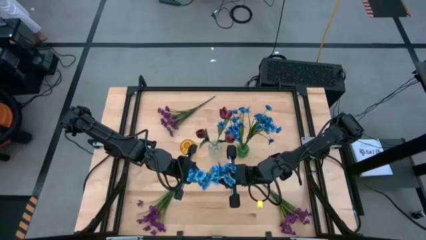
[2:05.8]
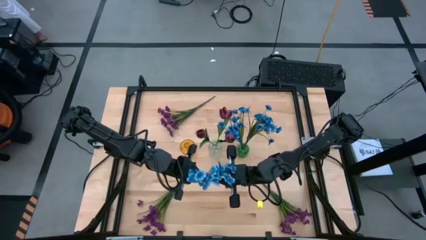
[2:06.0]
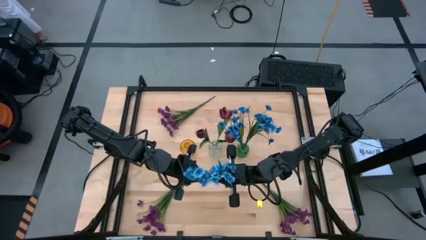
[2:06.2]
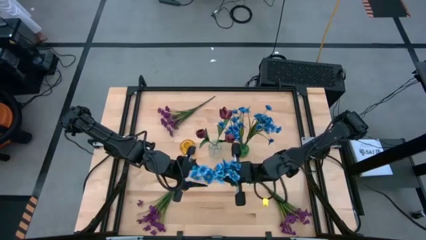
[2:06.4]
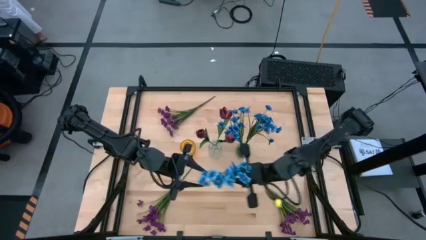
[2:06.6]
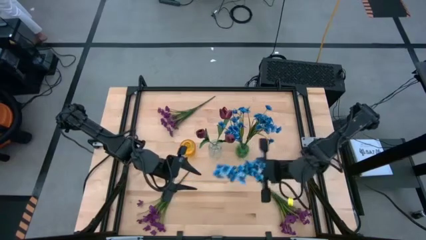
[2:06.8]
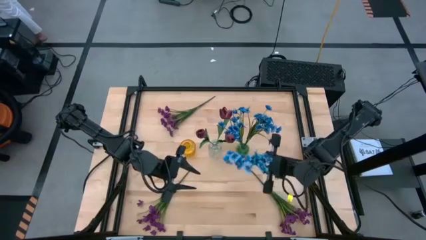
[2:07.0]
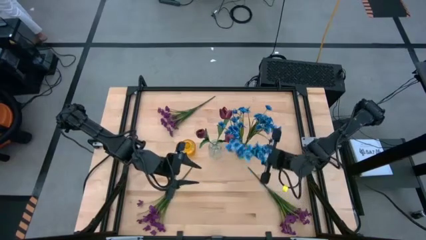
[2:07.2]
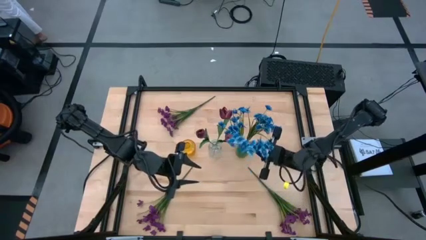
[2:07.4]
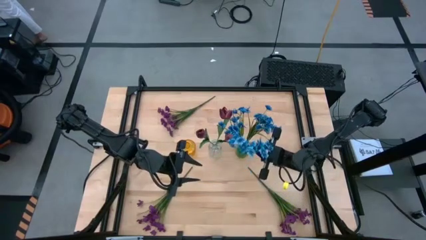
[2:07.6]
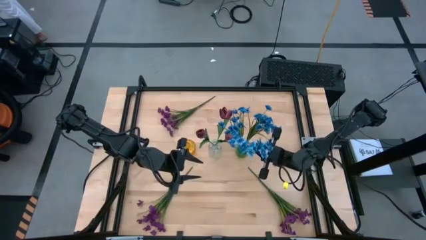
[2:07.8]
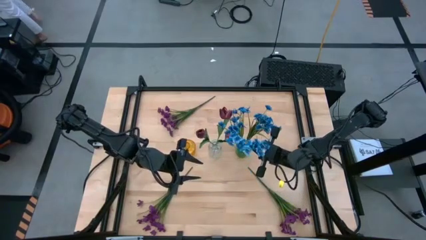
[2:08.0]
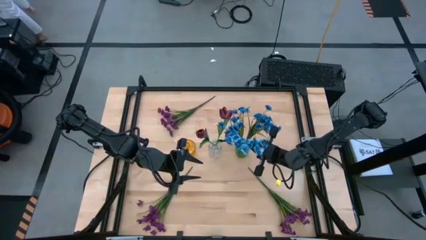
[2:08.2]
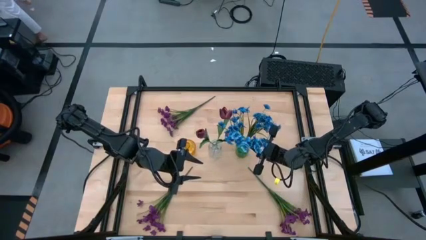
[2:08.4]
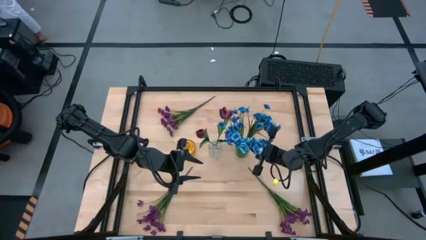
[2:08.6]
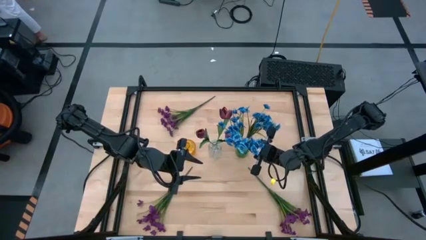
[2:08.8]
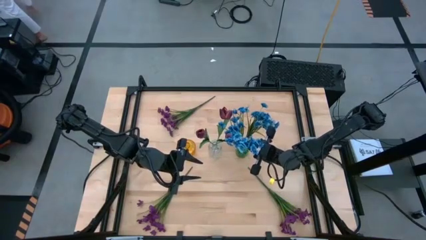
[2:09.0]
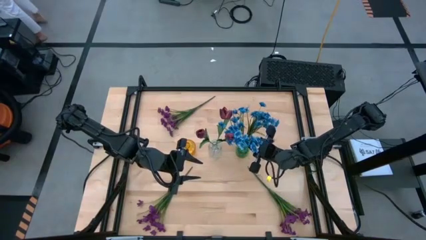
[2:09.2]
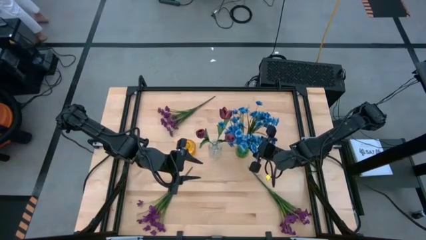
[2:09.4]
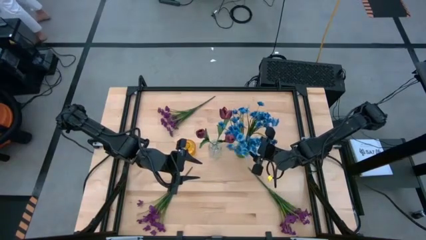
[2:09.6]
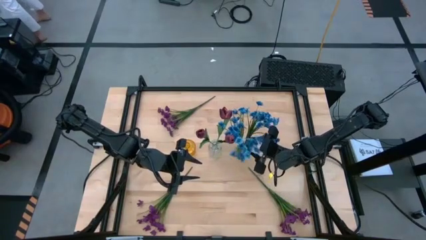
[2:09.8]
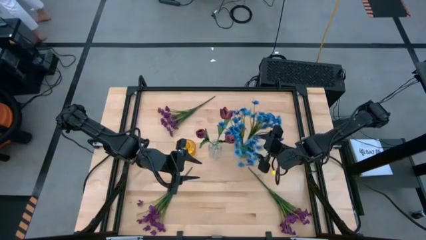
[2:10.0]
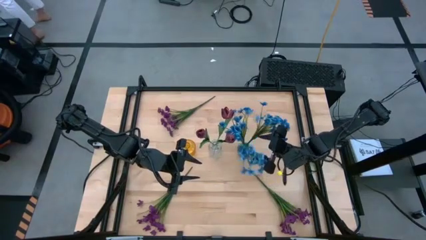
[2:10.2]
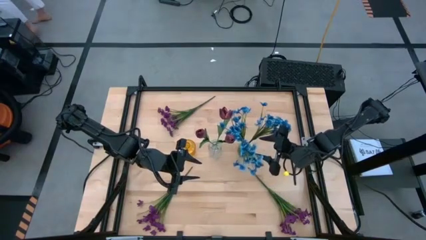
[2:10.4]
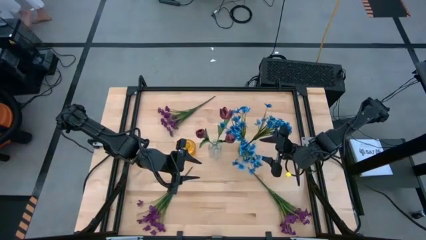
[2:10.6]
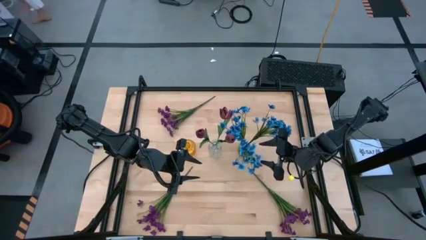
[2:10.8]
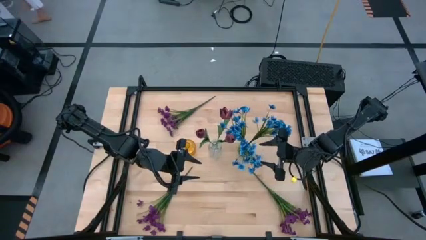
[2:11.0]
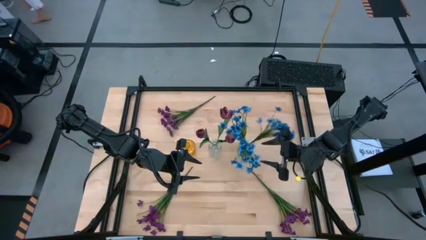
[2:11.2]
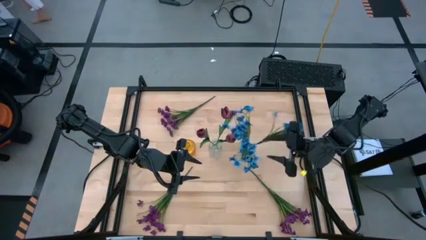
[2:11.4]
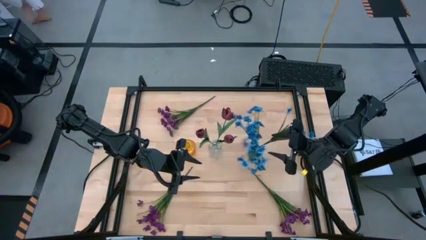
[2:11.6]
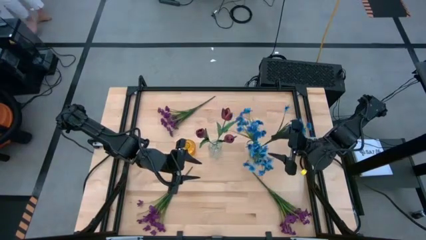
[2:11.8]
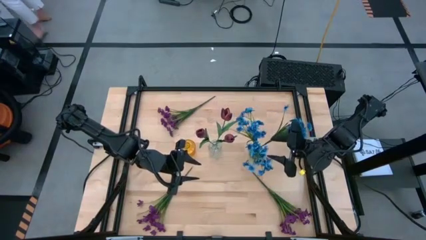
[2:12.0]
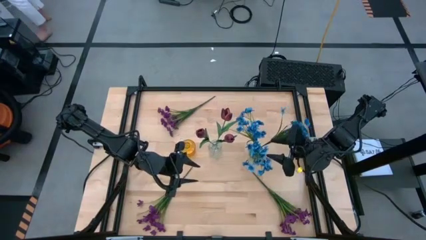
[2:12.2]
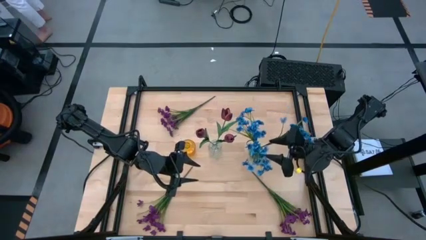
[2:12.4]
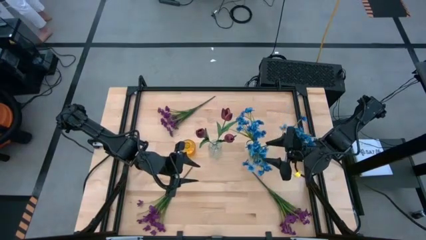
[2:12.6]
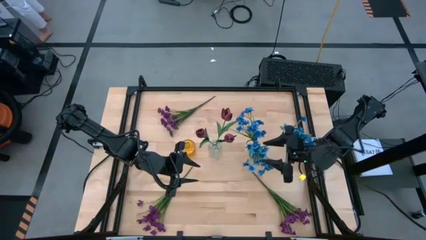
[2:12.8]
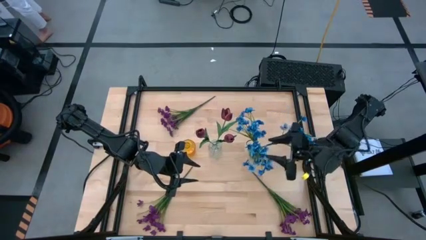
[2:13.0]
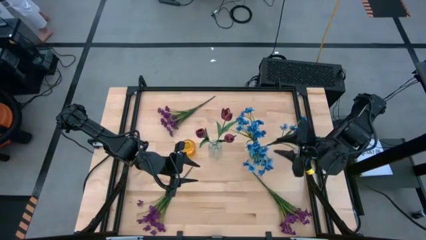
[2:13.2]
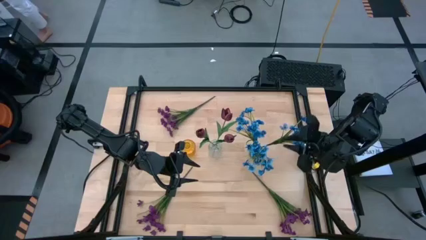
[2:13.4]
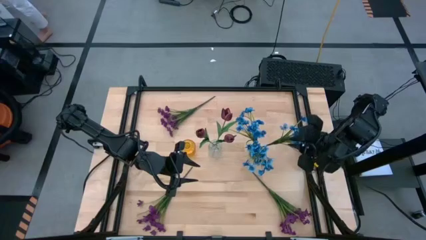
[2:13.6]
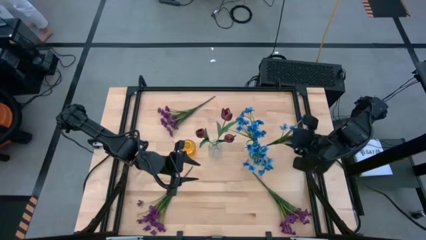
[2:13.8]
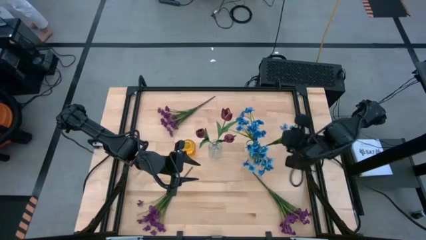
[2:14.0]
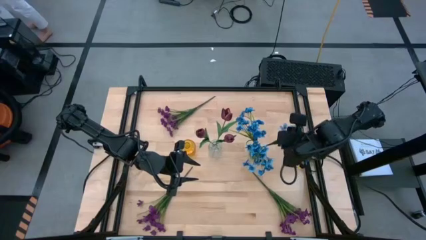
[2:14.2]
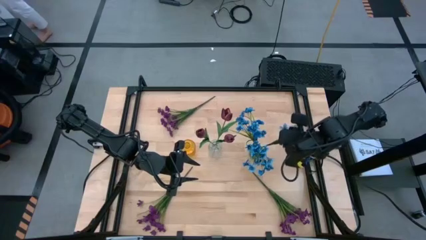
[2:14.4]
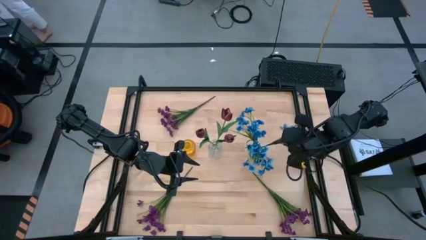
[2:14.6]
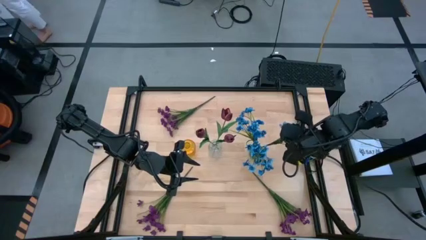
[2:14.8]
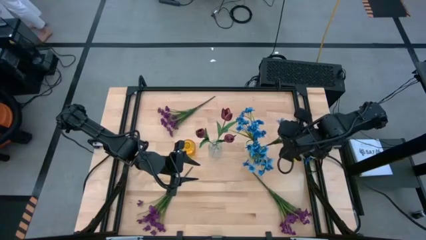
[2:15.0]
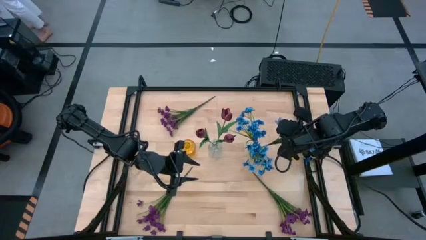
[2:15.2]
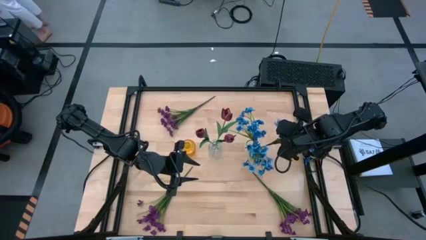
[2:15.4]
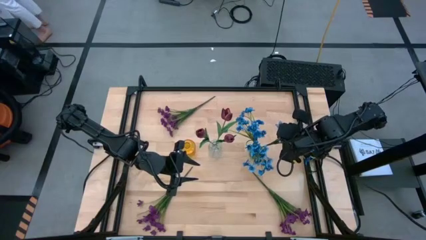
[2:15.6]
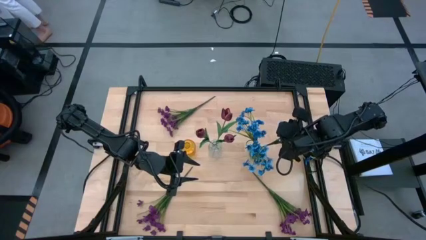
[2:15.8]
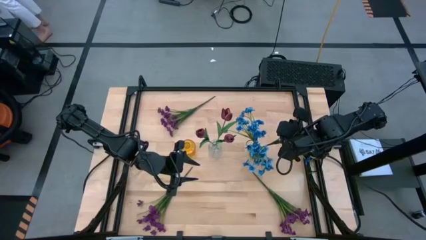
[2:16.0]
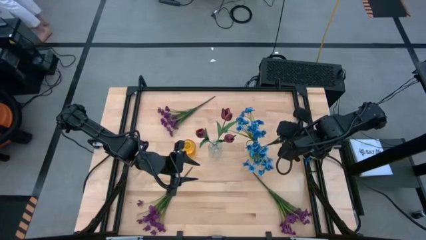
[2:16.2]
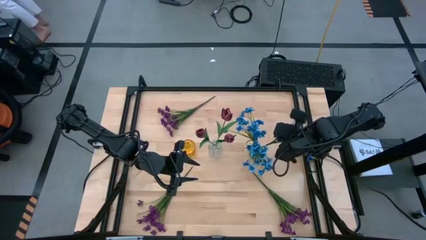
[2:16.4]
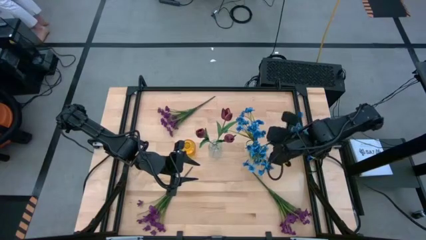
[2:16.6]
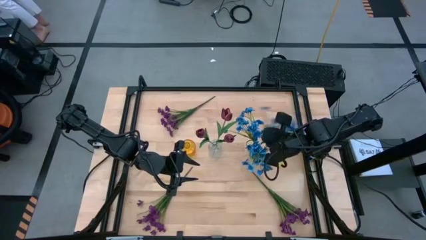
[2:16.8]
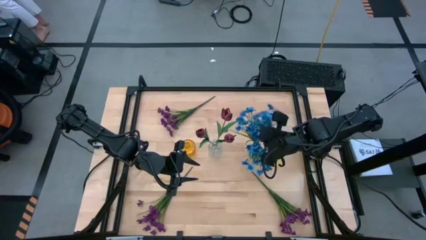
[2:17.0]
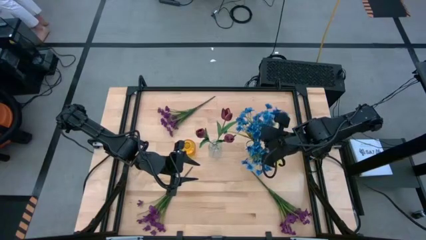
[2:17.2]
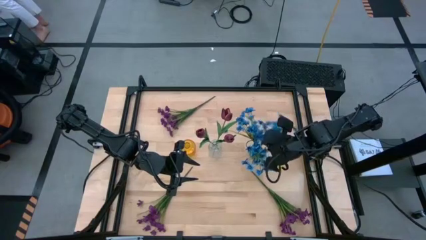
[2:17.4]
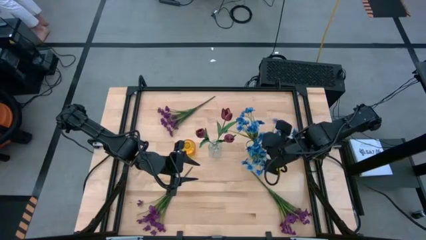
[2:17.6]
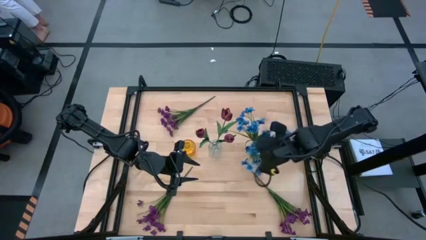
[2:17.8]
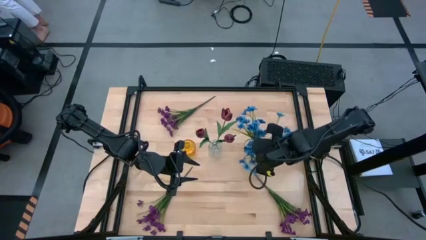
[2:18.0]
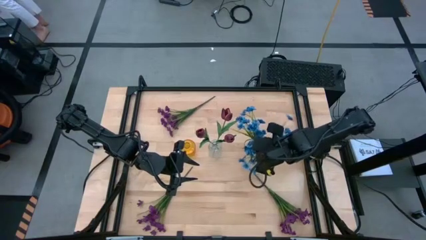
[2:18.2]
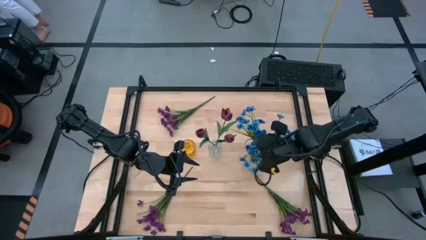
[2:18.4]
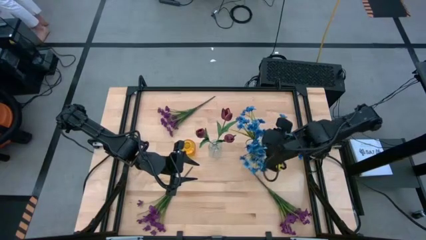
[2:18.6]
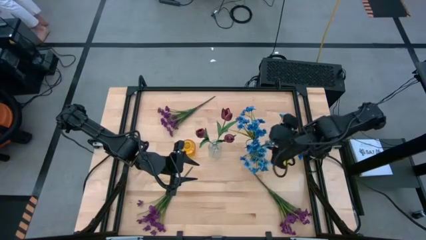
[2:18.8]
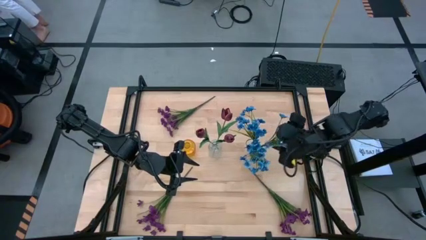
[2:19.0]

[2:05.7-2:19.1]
Task: Sort flowers into vase by color
Put the blue flowers into the green vase

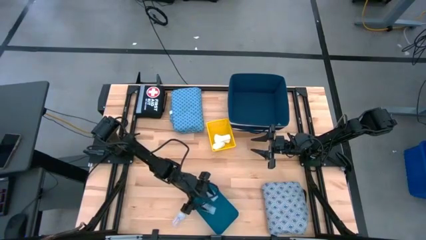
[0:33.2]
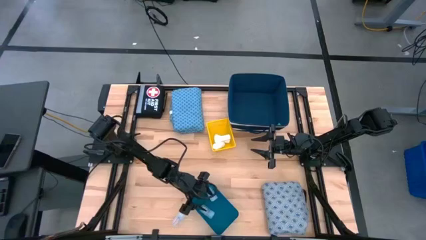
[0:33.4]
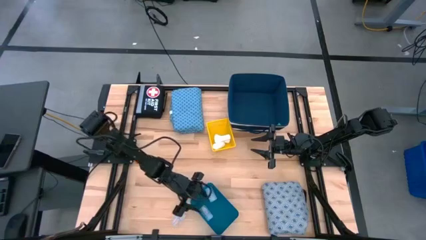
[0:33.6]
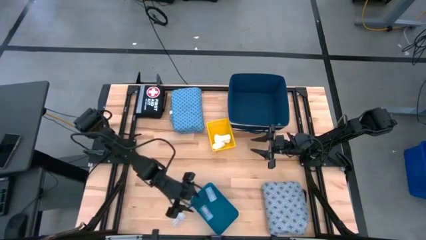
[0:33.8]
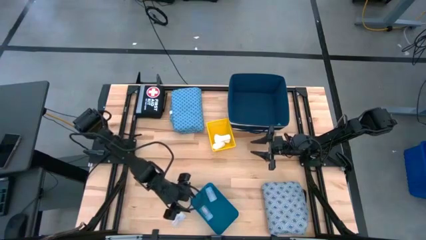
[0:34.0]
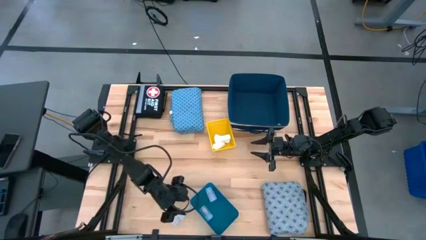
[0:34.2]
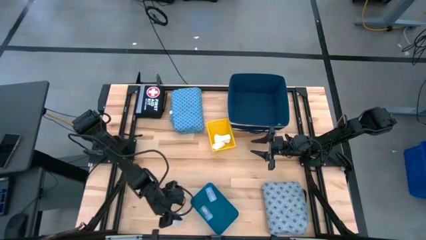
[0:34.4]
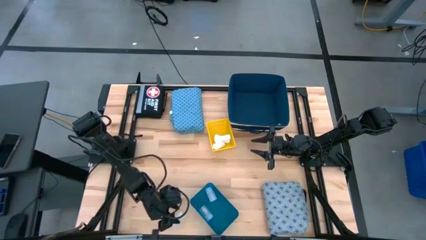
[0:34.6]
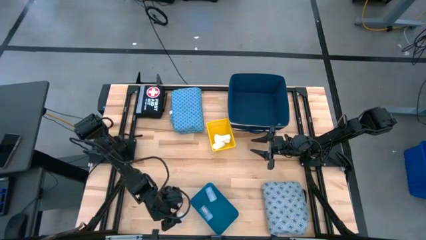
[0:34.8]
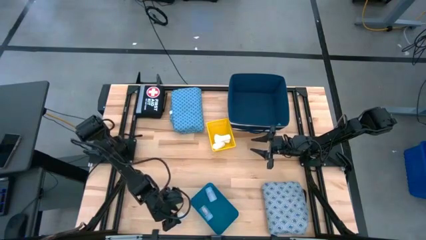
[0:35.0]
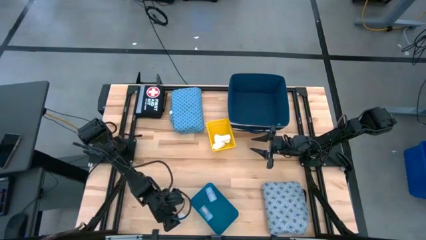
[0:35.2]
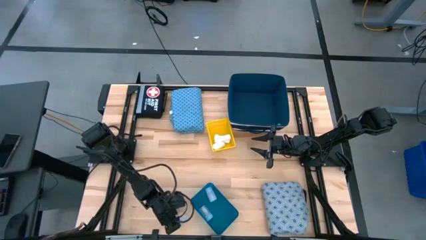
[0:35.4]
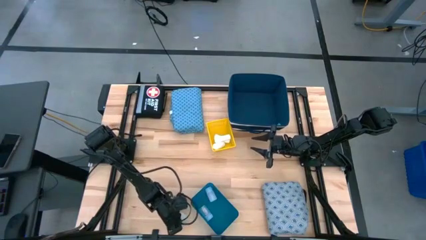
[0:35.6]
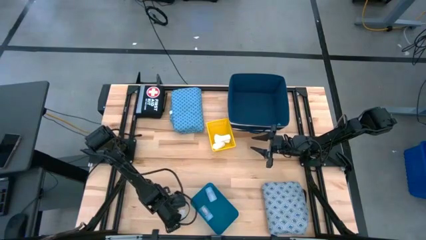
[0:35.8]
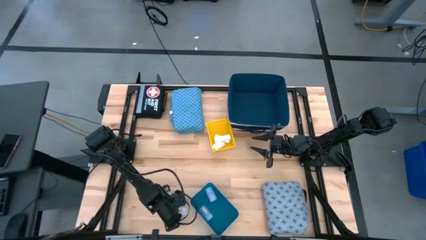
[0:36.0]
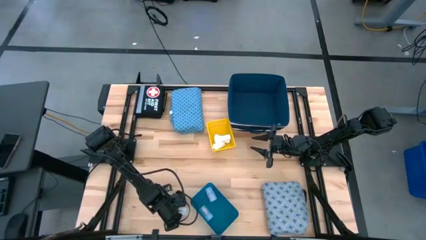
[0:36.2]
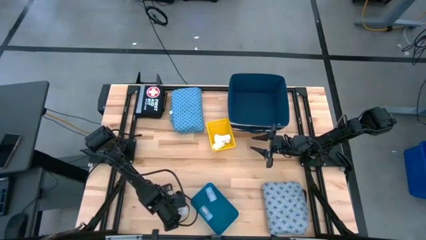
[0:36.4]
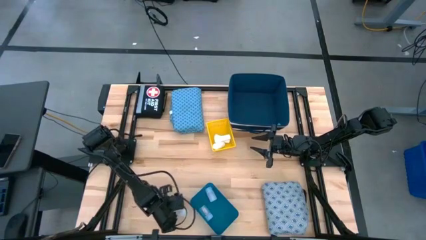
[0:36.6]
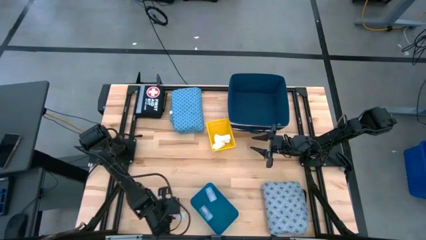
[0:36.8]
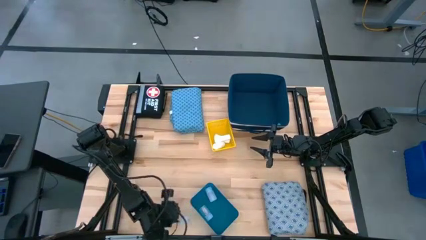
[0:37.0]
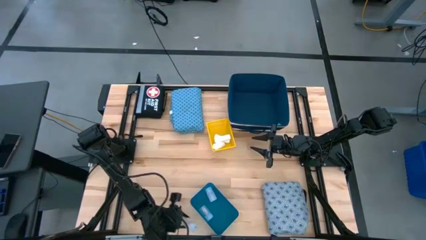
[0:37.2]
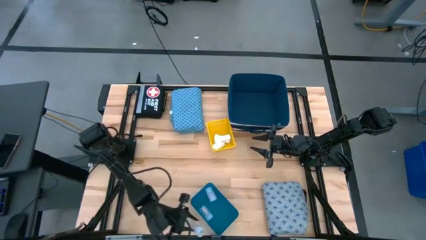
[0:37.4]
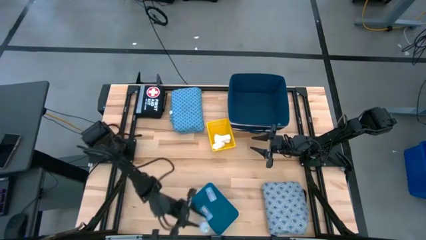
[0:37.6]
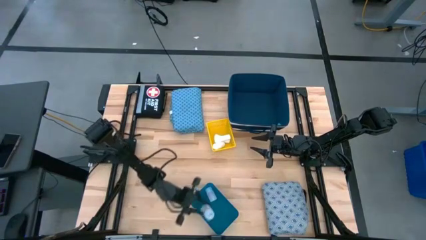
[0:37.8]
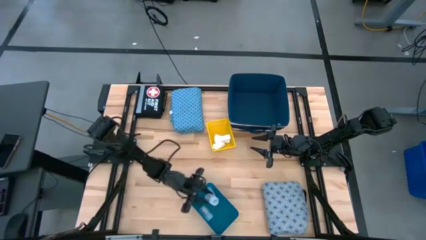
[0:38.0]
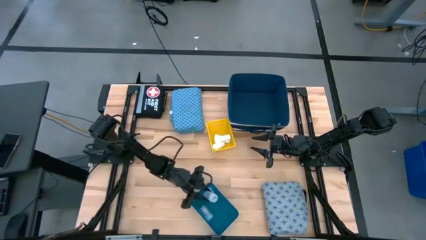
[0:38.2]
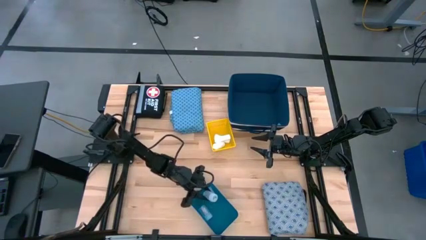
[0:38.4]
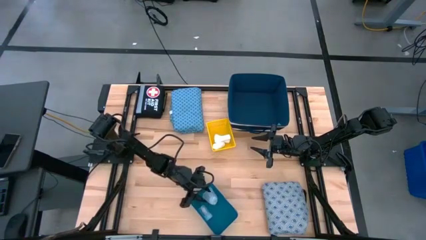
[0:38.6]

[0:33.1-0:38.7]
Task: Pick & place medical supplies in basket/bin
Put the transparent medicine bottle into the blue bin
